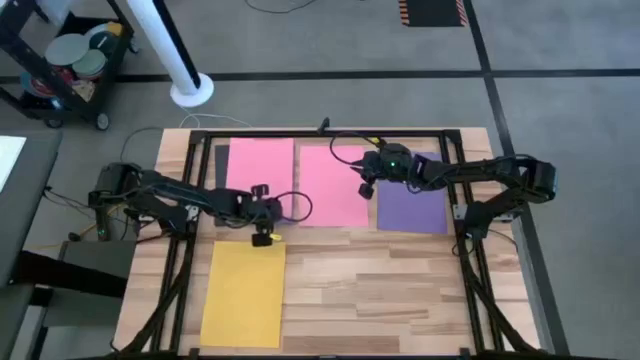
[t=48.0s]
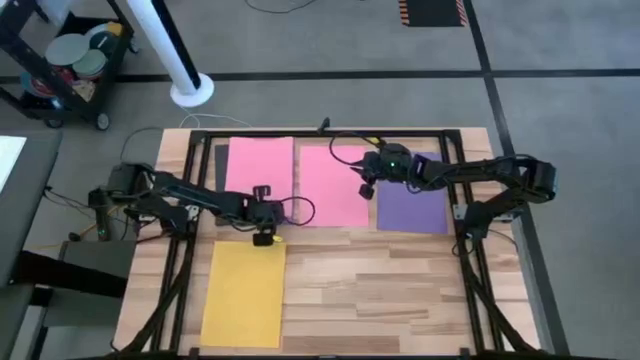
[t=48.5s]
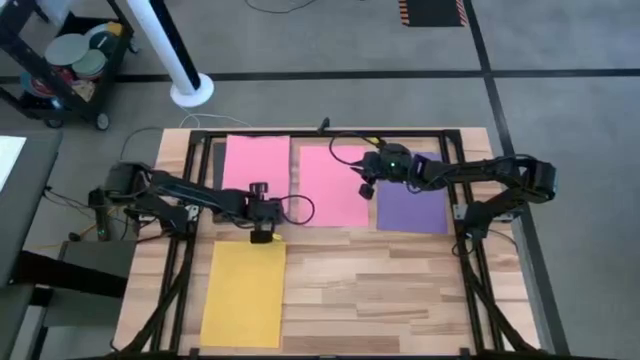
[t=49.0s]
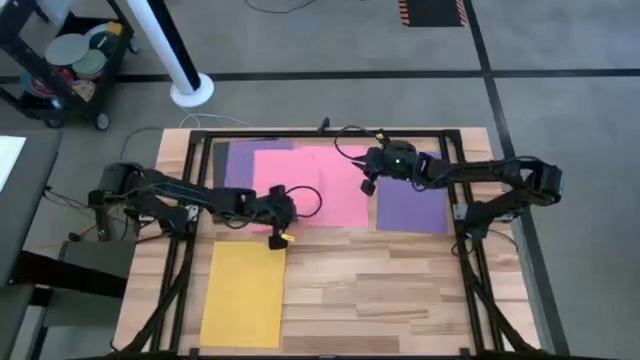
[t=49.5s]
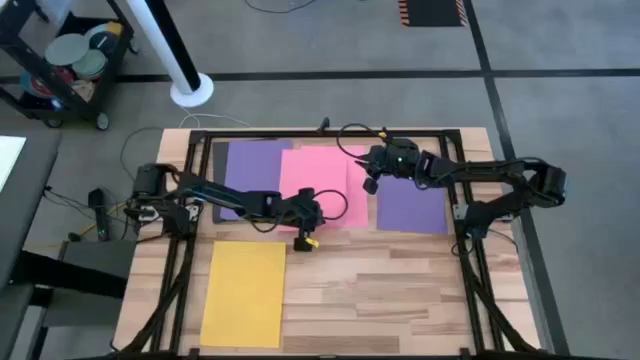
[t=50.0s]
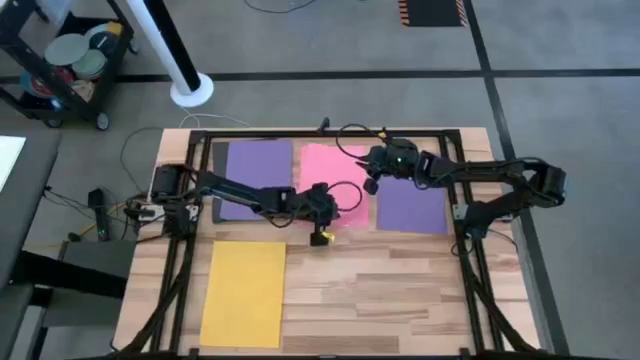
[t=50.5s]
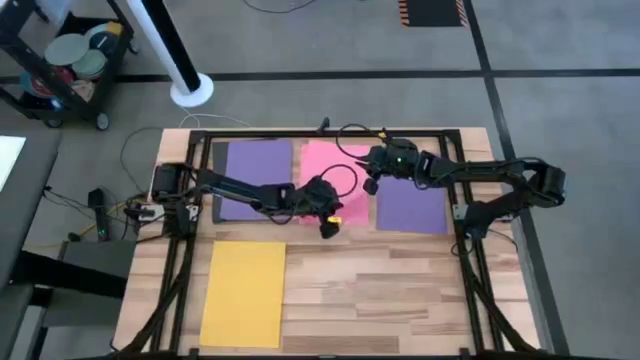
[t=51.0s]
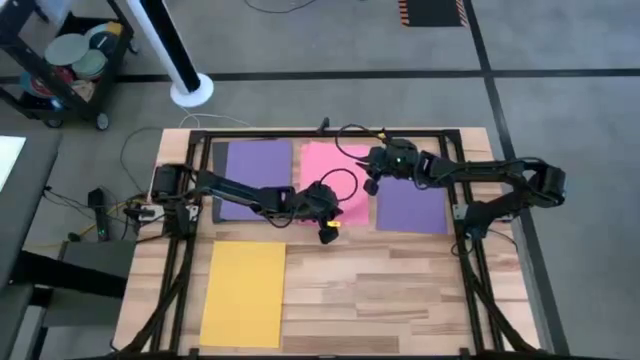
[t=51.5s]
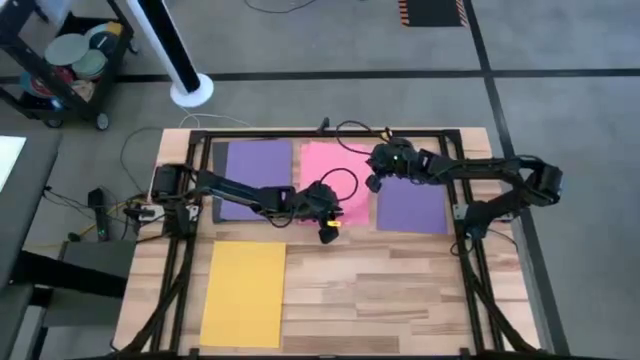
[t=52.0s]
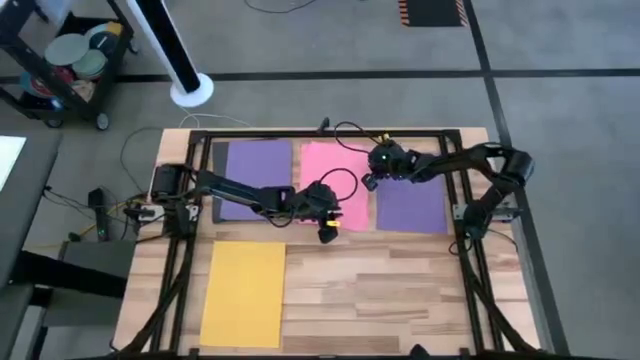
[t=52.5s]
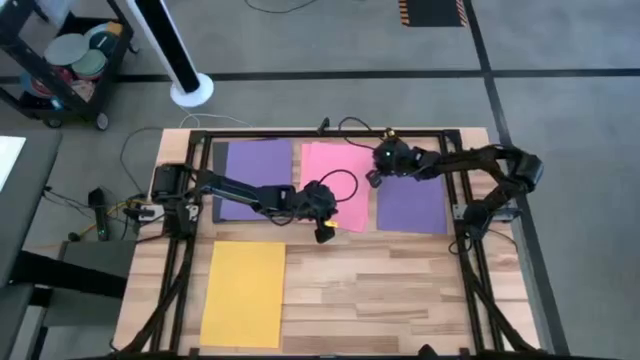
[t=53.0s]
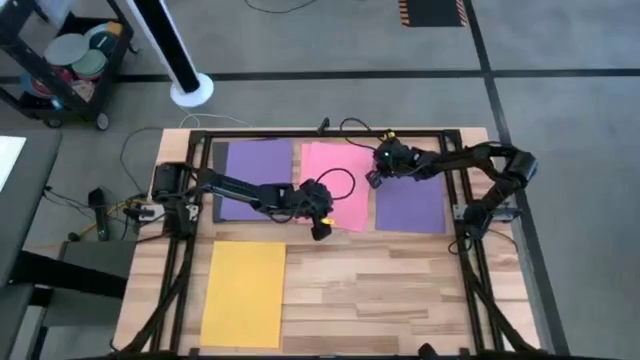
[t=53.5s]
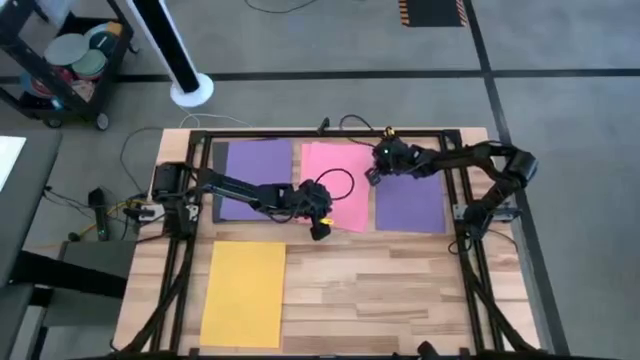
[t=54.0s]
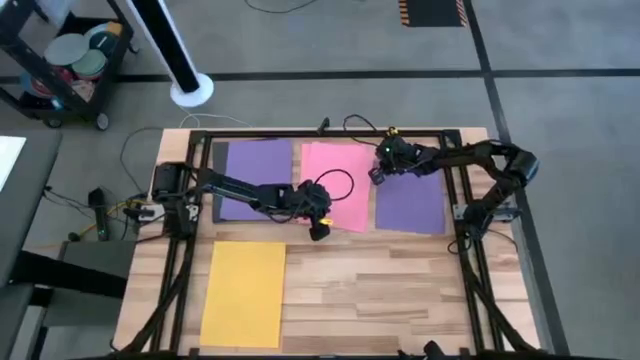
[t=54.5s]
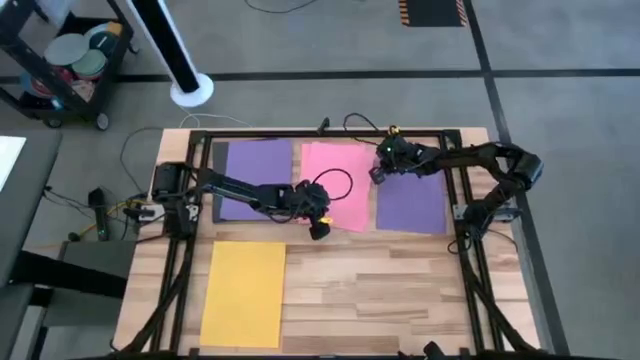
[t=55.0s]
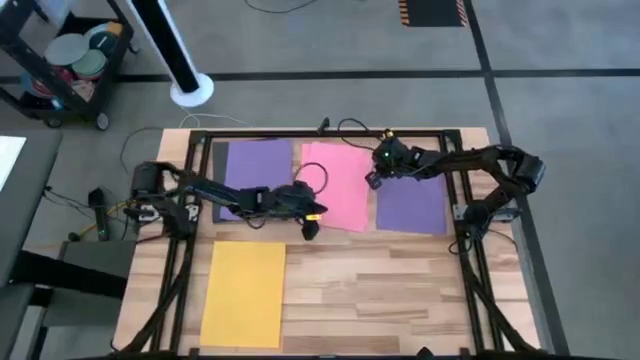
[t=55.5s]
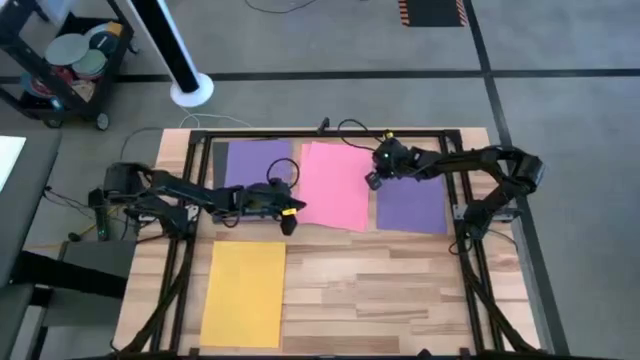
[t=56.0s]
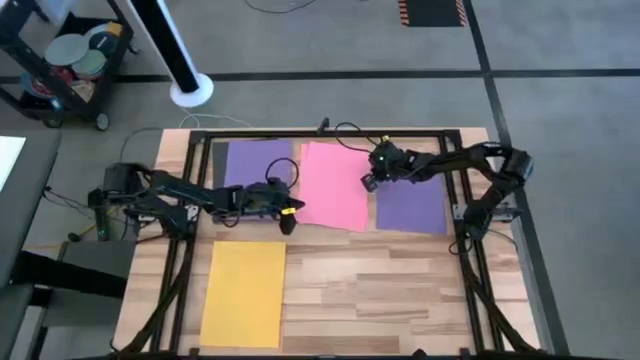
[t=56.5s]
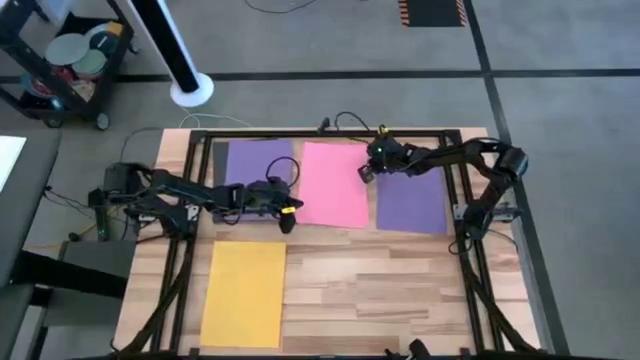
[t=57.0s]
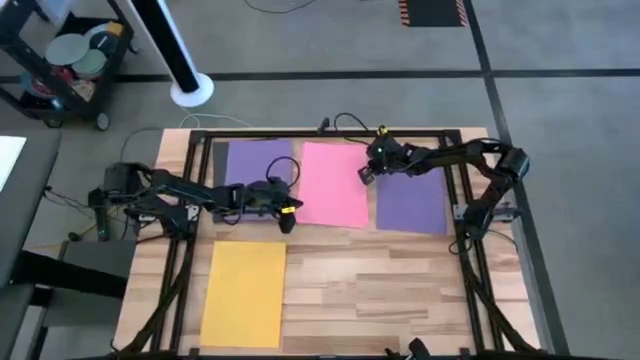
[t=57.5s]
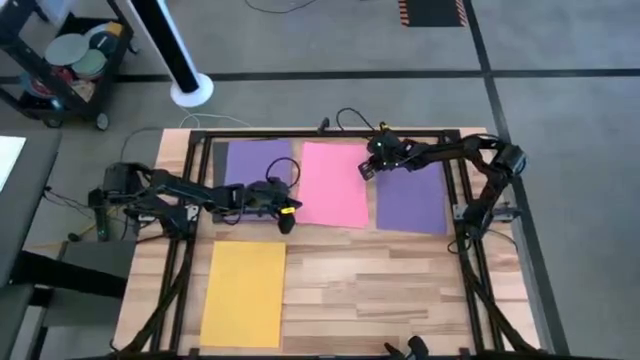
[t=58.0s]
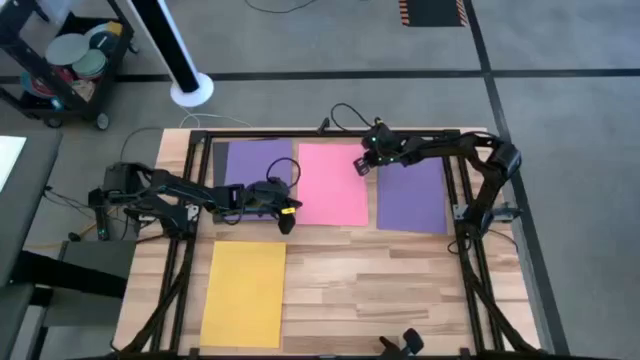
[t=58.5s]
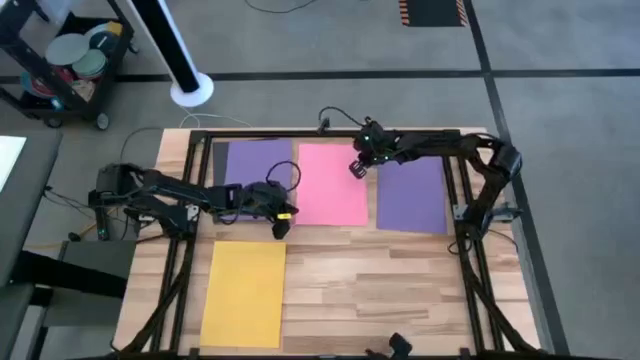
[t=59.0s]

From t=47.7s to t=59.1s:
Task: Organize paper
Stack the pink paper on top of the pink paper

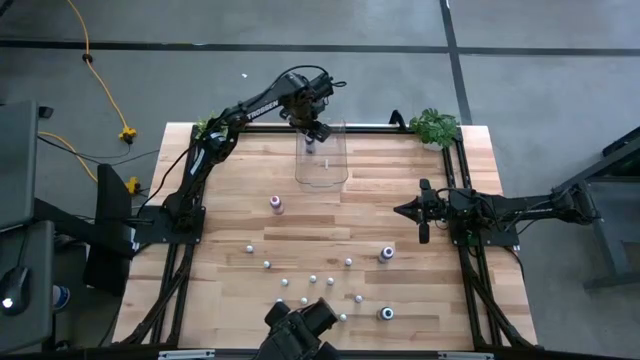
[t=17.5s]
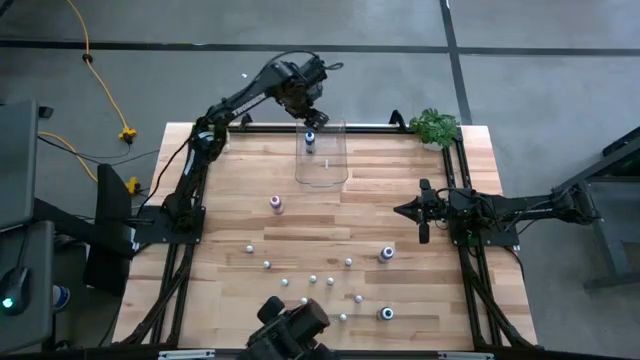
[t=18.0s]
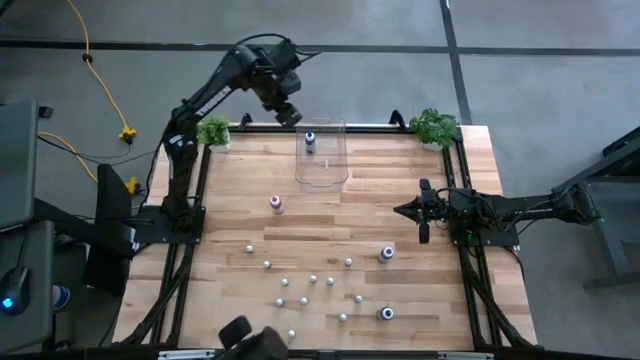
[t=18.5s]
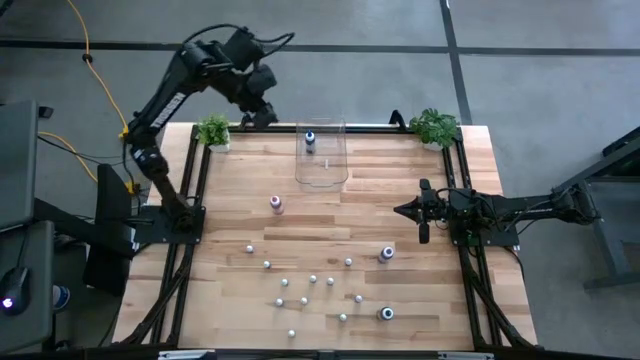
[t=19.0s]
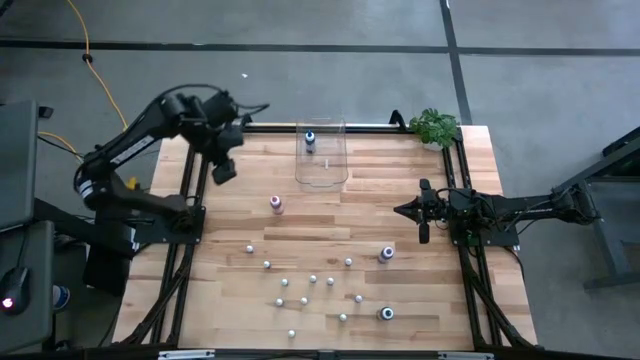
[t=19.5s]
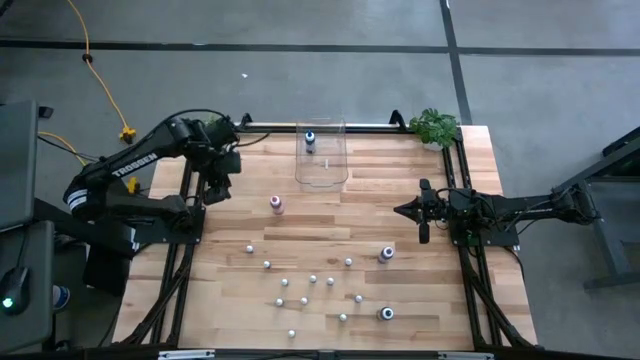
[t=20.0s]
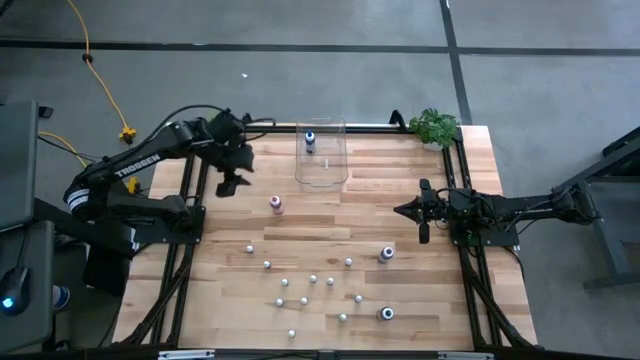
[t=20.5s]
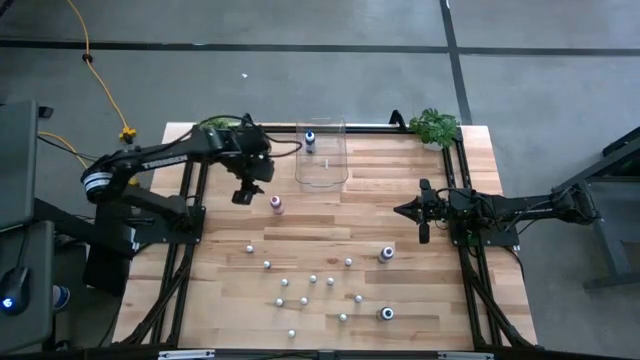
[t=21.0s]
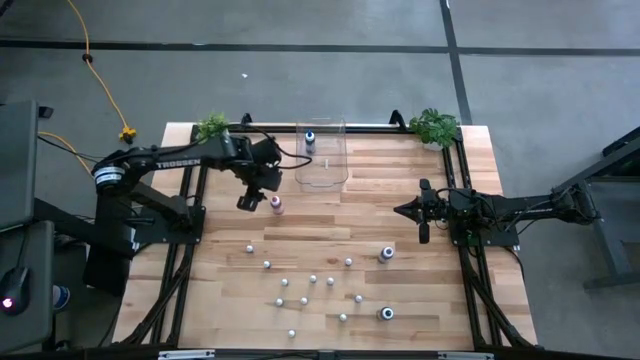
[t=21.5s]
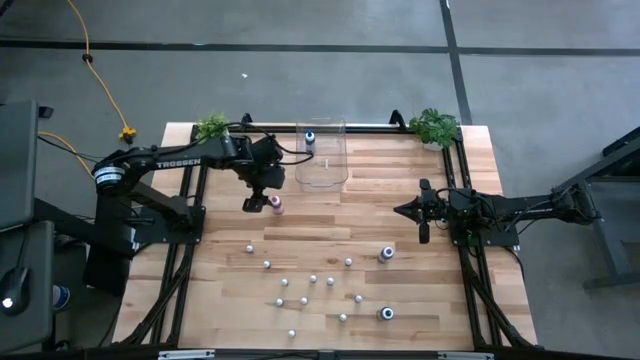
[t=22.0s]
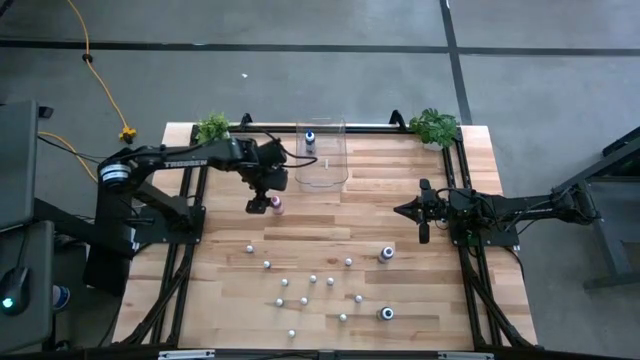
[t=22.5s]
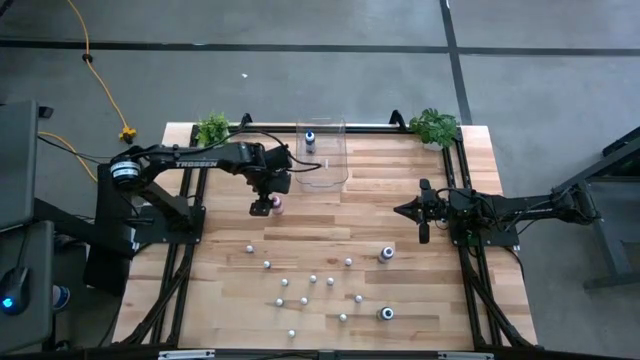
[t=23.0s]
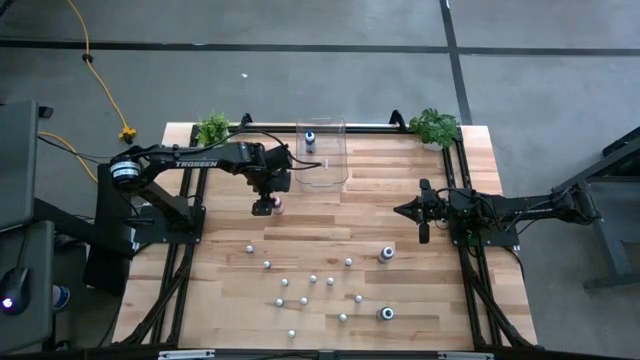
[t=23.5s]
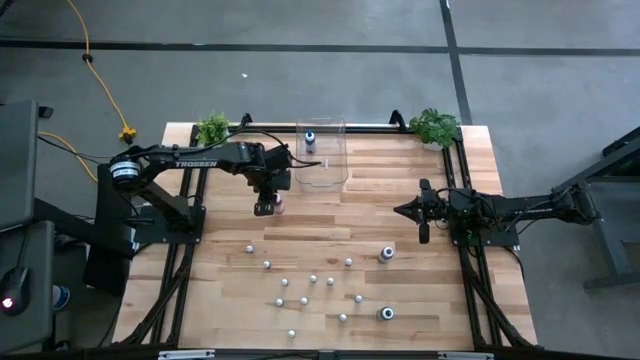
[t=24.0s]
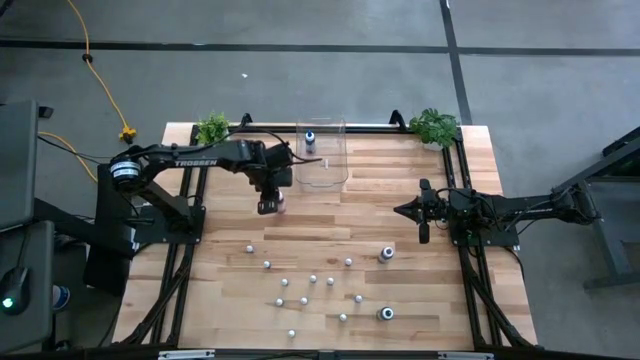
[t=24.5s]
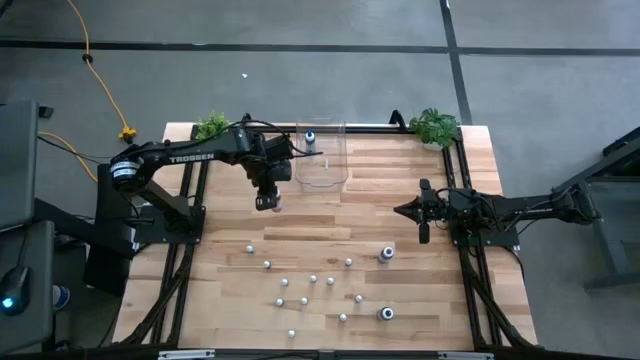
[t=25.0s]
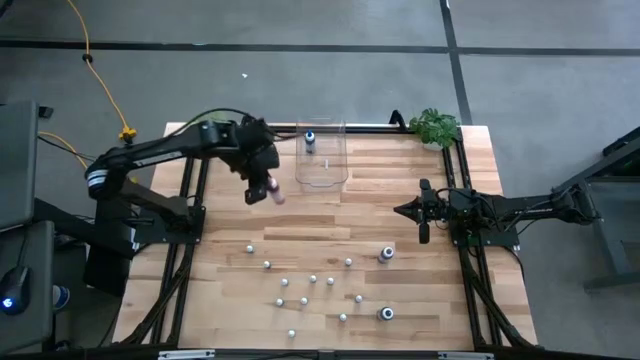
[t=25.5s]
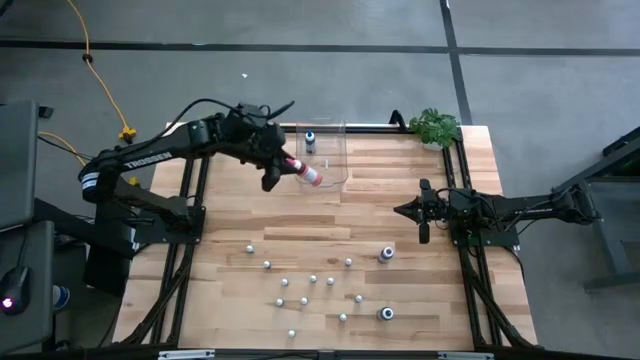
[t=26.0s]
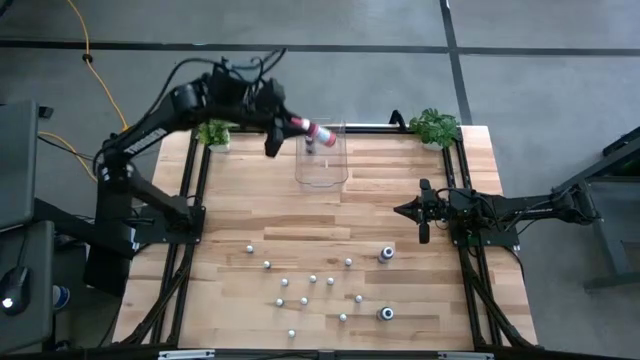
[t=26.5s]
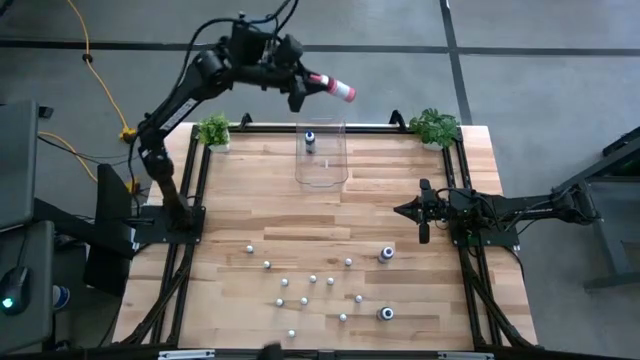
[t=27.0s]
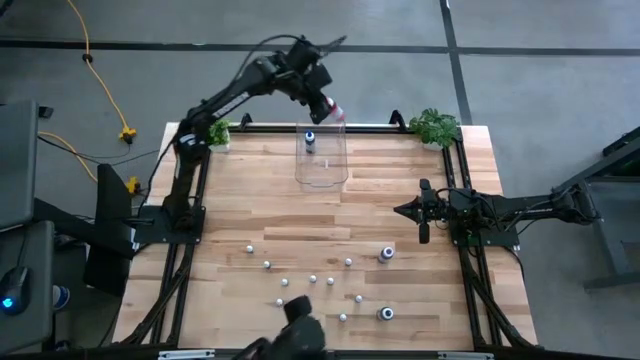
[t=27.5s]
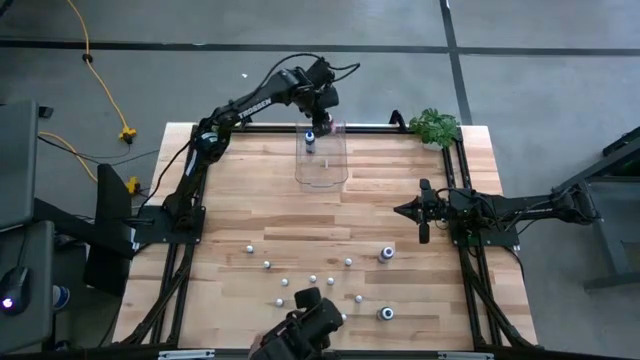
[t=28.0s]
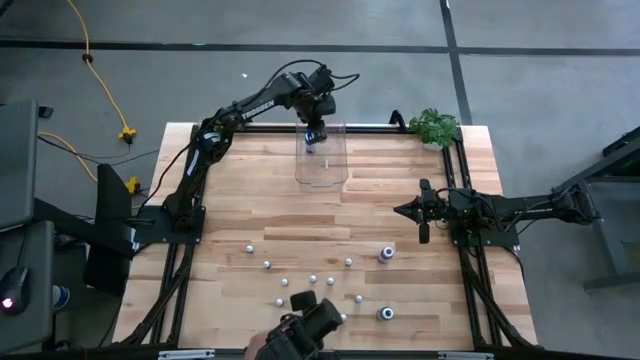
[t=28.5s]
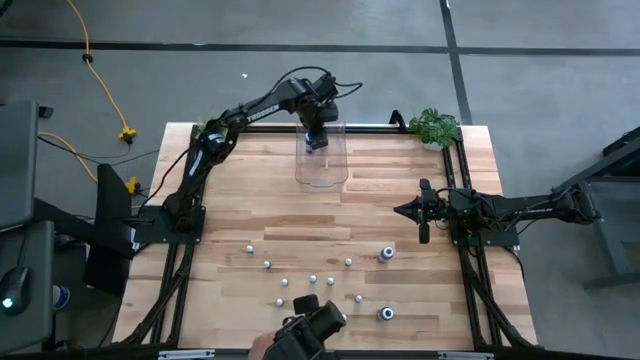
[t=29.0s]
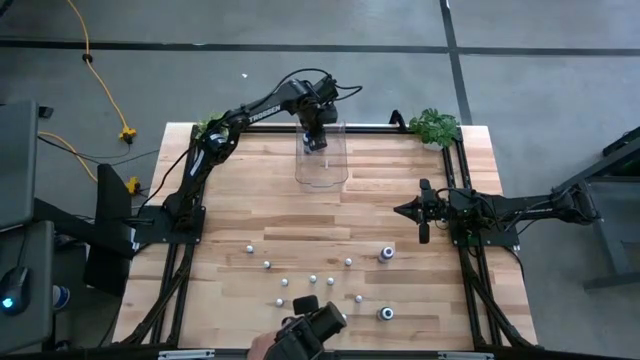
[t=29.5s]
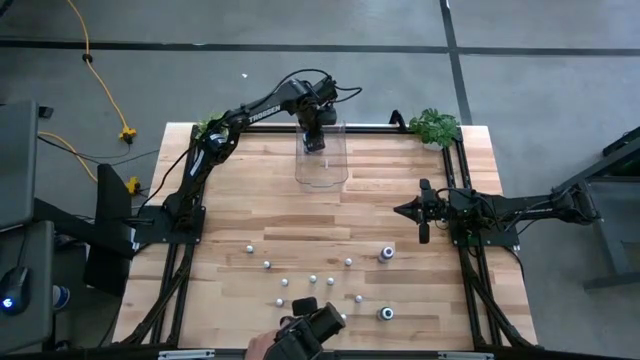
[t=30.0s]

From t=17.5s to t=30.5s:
Task: Pick & Place food coloring
Put the large red food coloring into the transparent bin
